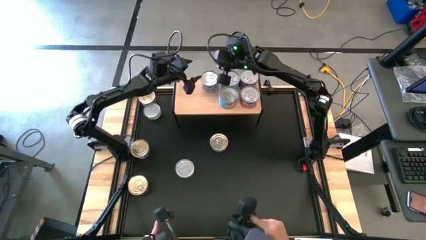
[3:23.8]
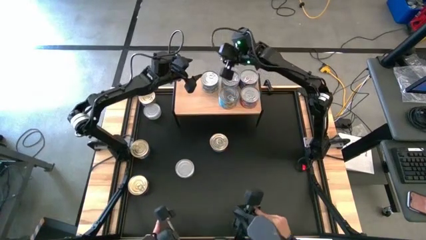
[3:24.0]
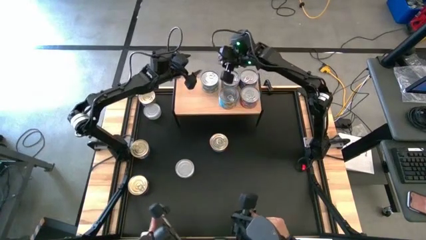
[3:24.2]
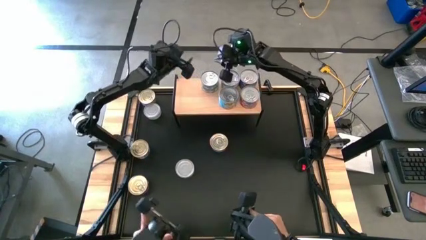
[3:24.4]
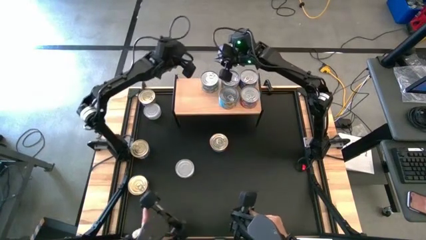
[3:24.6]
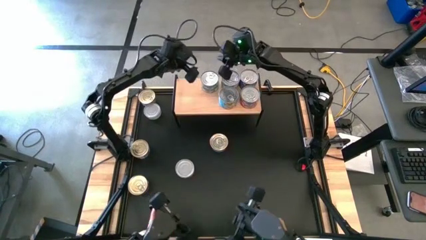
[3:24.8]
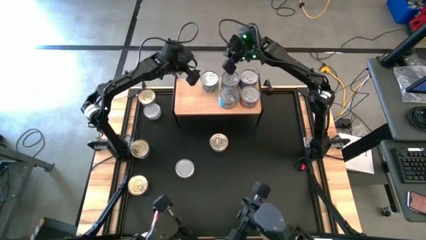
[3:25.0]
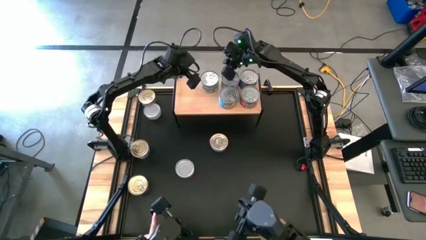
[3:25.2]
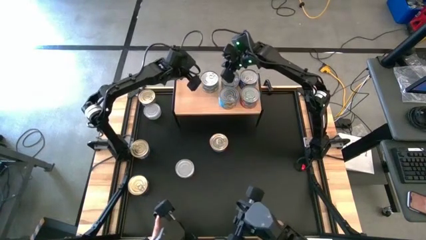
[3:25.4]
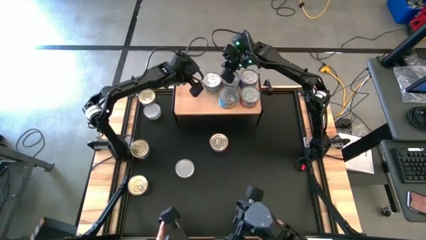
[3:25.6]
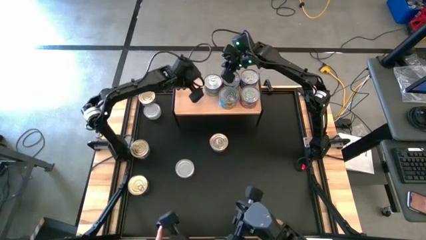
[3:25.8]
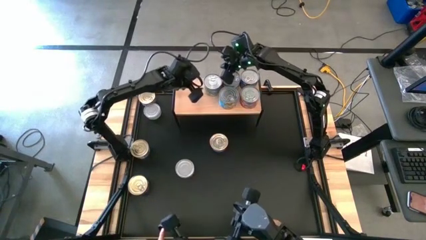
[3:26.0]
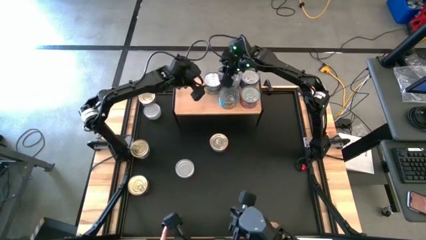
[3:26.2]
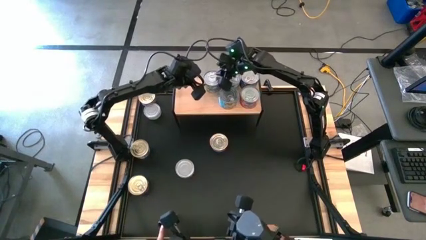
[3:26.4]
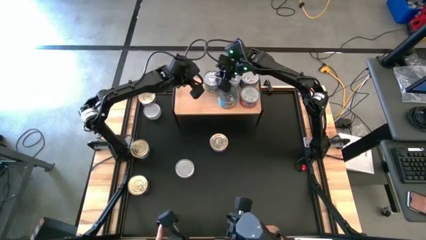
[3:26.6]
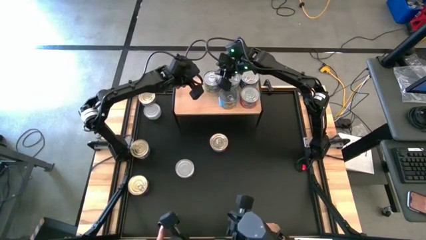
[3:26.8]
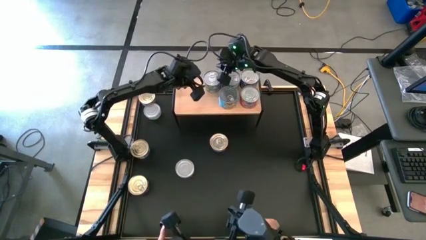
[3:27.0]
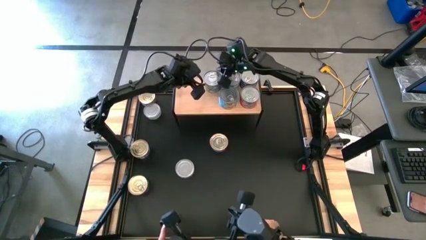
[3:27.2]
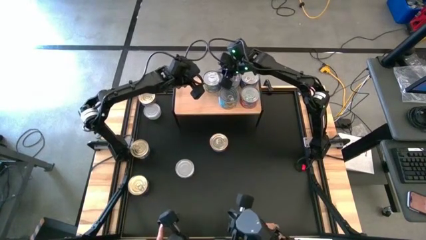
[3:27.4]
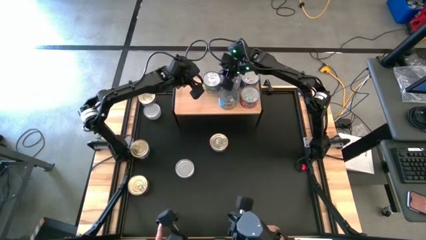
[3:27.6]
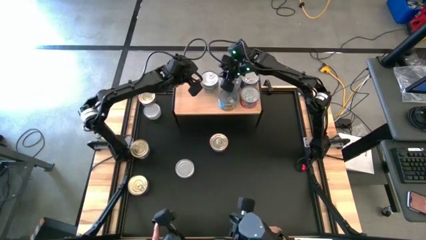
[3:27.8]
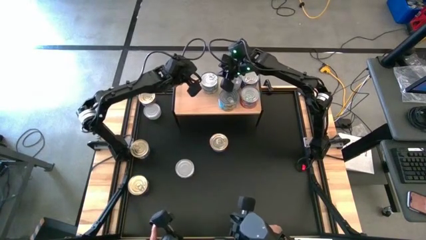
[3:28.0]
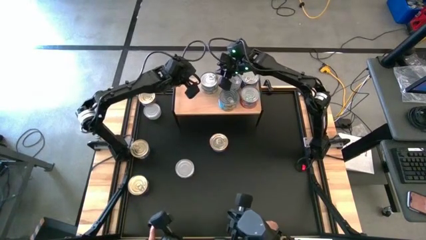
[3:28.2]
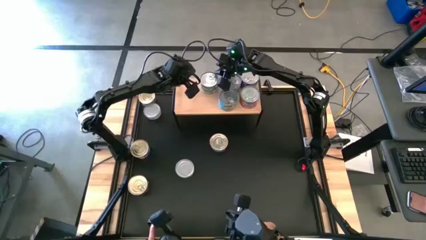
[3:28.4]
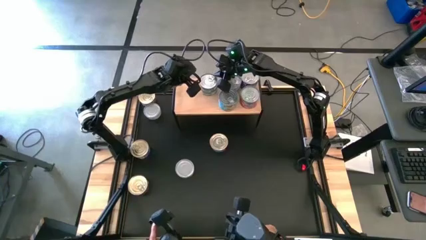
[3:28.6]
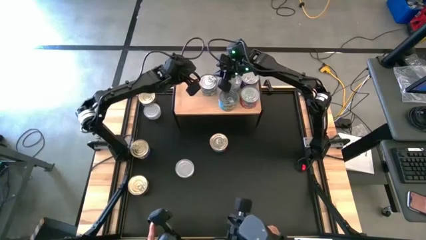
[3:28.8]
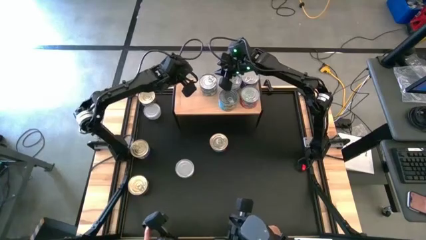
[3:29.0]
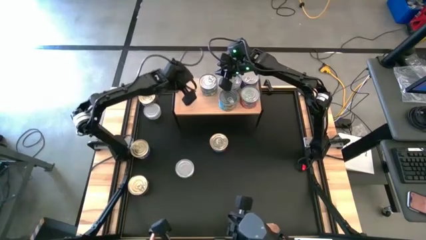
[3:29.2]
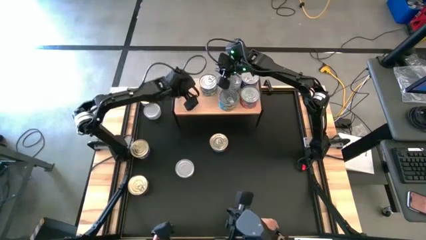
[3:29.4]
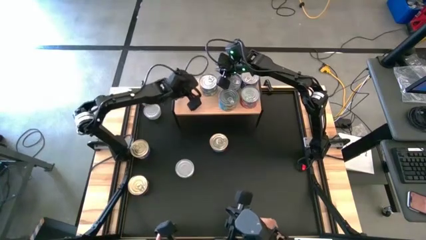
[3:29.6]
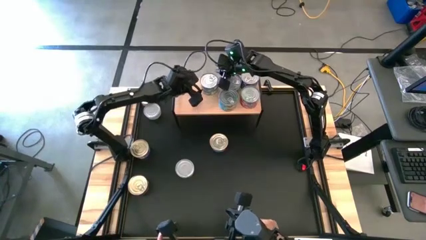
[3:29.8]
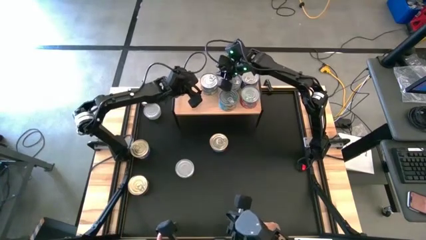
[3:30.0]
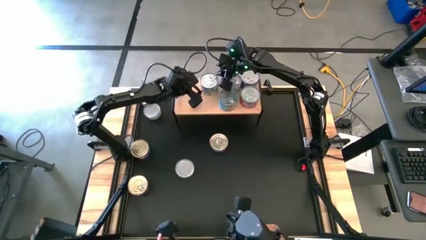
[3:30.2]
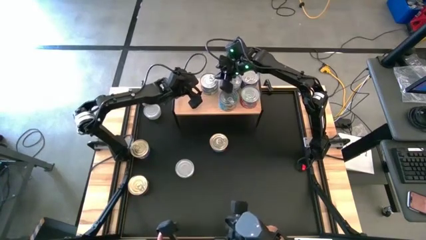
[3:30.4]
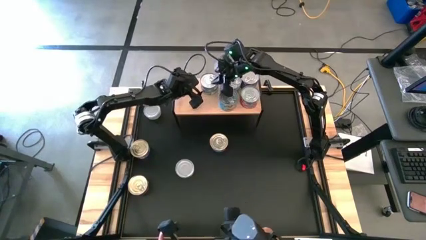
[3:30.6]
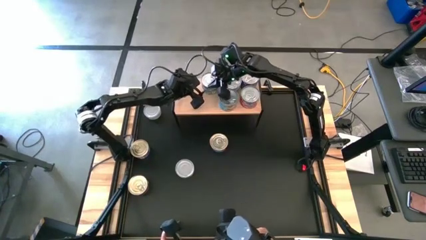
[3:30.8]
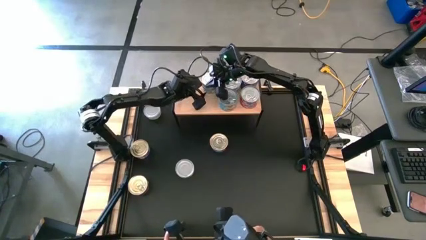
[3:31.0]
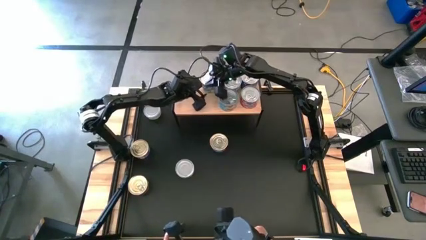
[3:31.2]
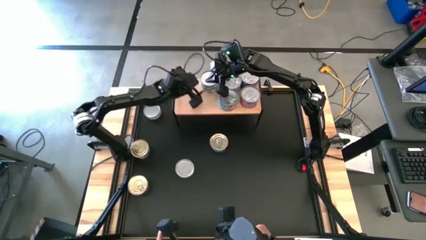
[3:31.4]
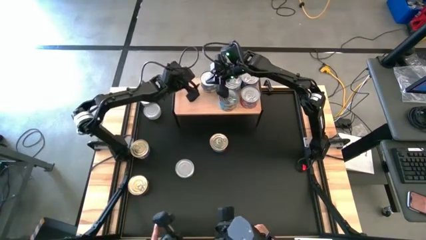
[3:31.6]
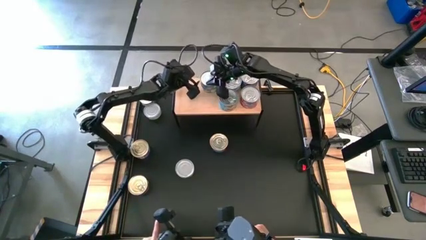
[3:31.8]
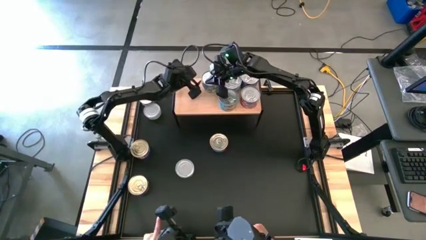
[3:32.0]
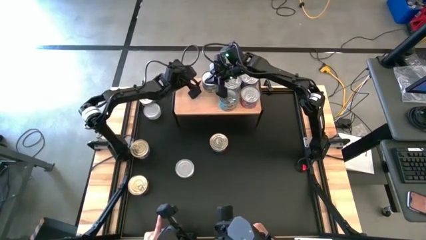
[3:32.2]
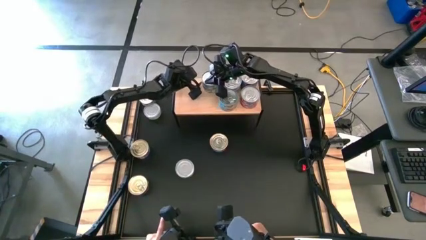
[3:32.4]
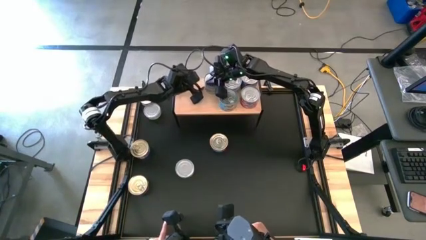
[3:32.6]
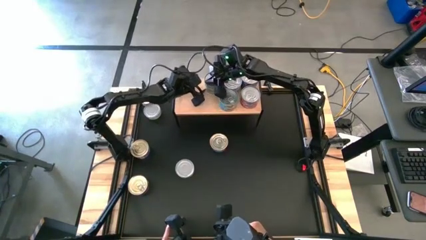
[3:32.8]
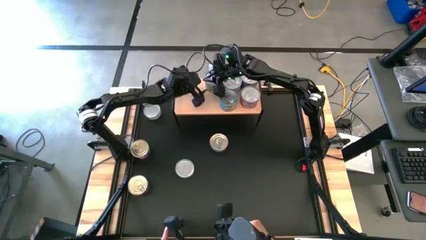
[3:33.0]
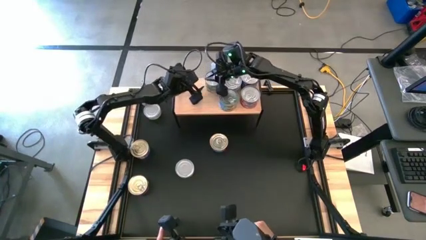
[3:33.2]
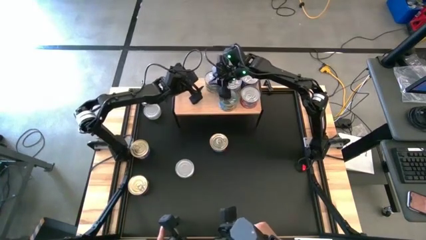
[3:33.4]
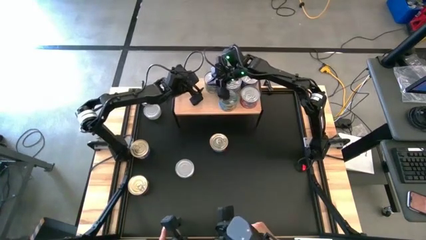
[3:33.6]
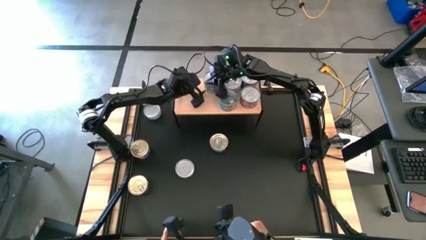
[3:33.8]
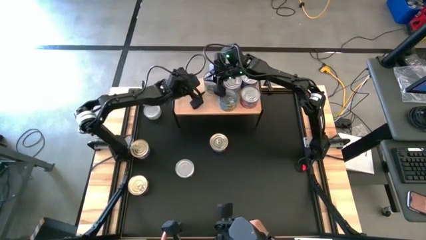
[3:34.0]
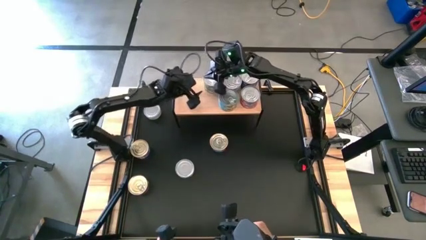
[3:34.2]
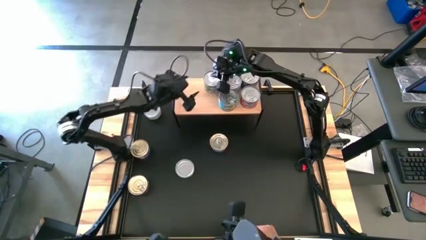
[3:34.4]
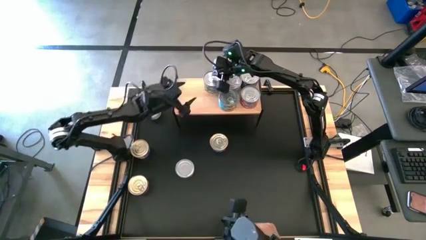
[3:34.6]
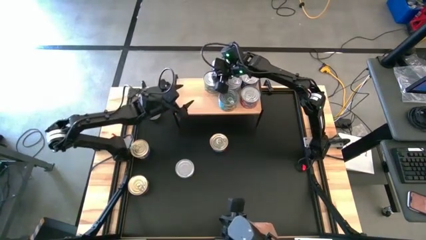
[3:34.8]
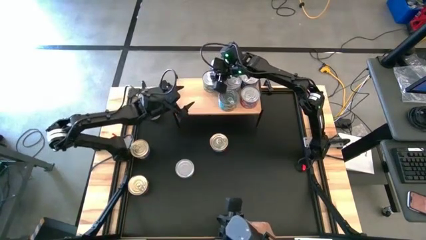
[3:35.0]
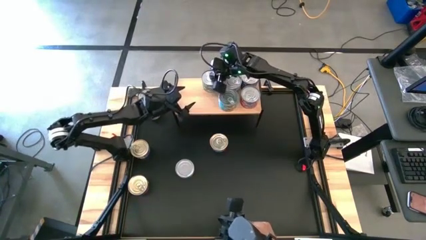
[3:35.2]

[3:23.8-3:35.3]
Task: Stack canned seafood by type on shelf
Stack the green tuna can on top of the other green tuna can on the shelf

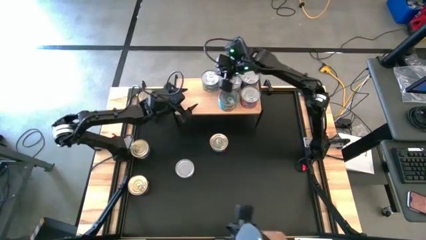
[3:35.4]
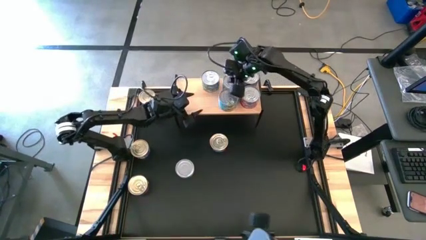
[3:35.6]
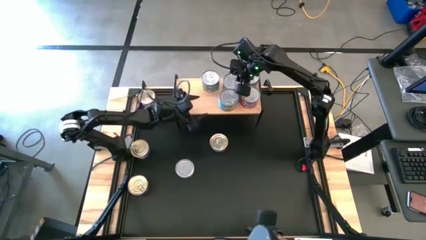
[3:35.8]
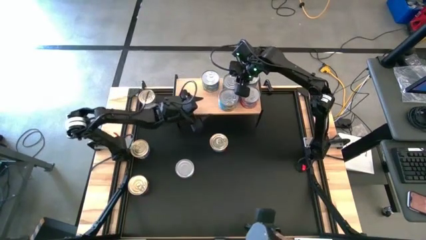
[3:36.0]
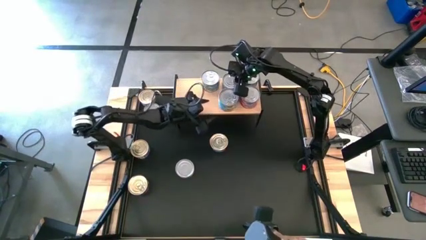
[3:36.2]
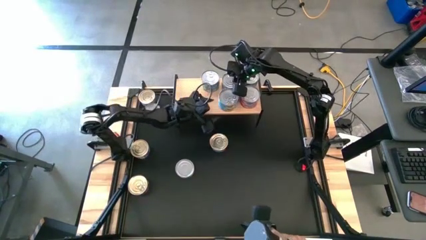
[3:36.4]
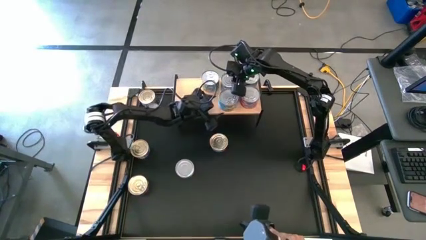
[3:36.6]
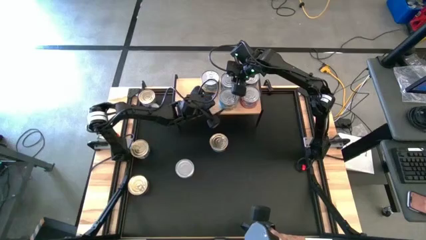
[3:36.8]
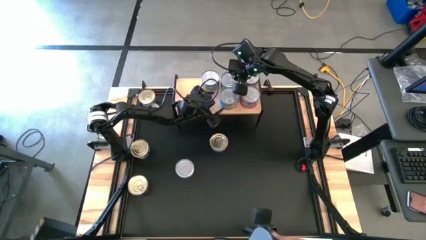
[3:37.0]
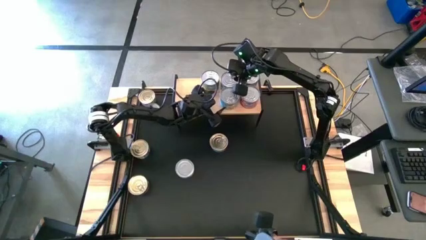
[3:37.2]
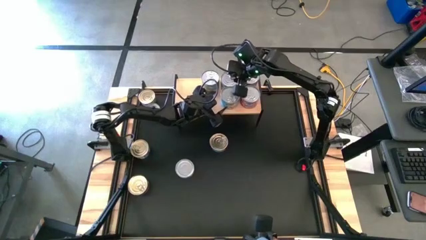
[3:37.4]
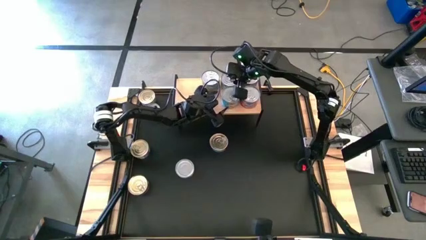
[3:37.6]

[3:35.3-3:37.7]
Adjust the tuna cans on the shelf
